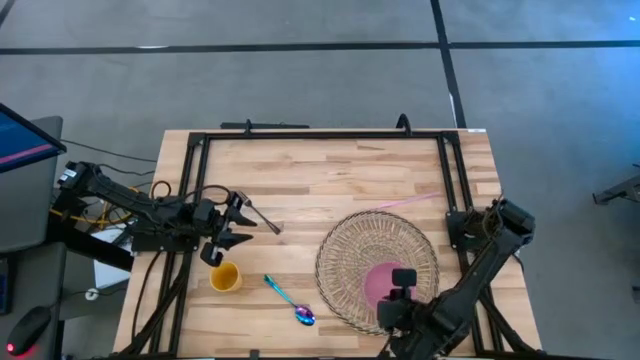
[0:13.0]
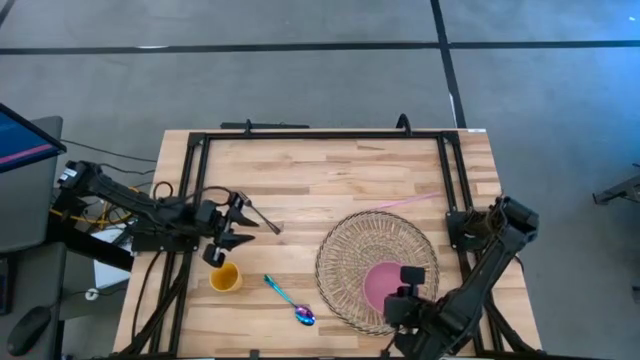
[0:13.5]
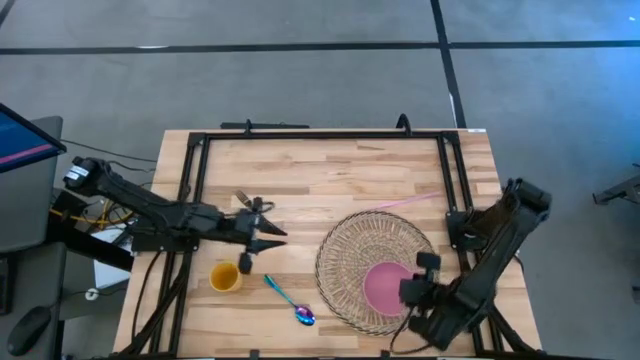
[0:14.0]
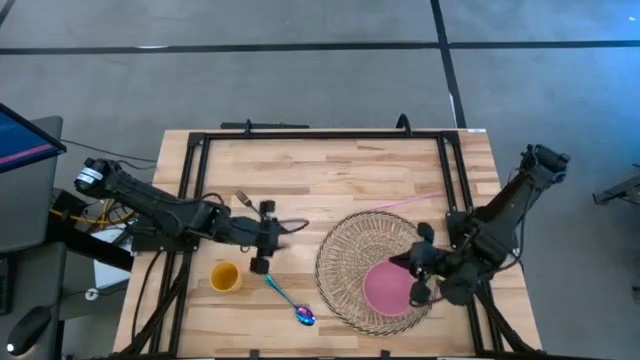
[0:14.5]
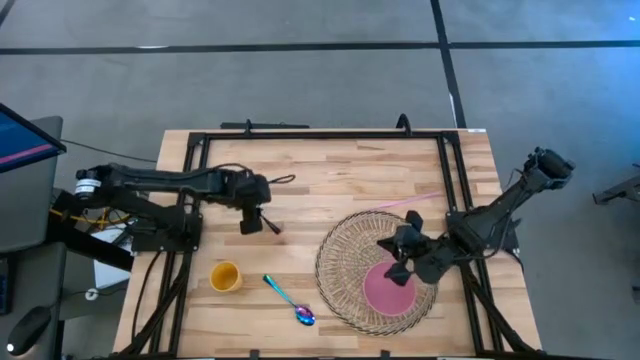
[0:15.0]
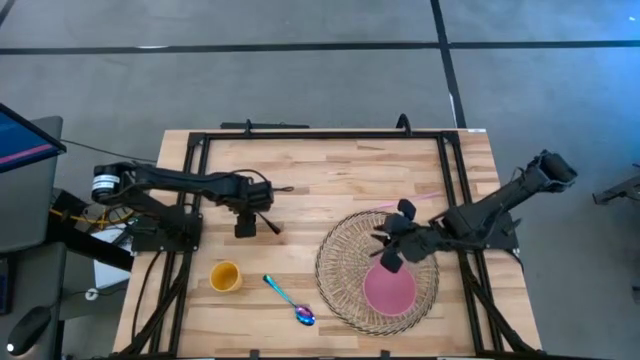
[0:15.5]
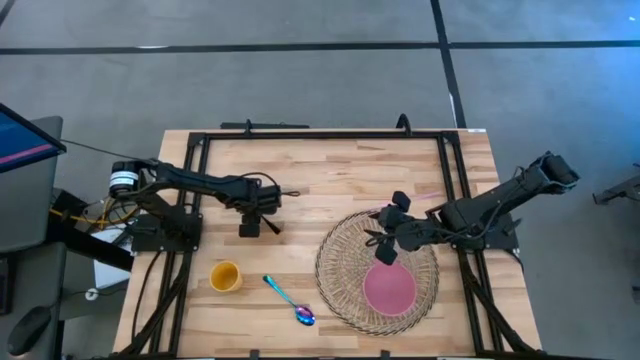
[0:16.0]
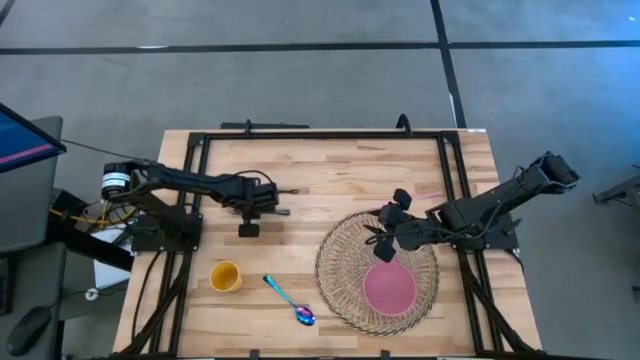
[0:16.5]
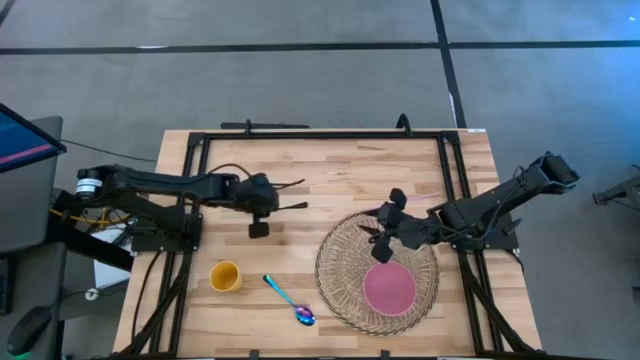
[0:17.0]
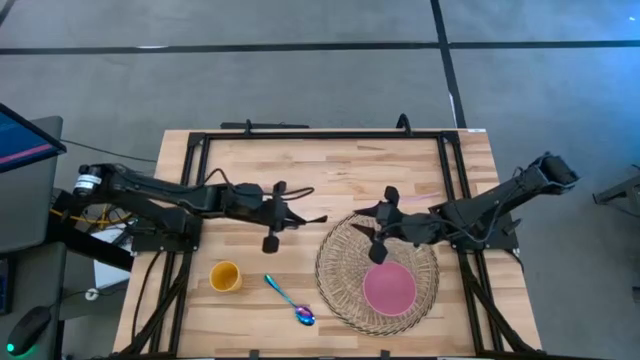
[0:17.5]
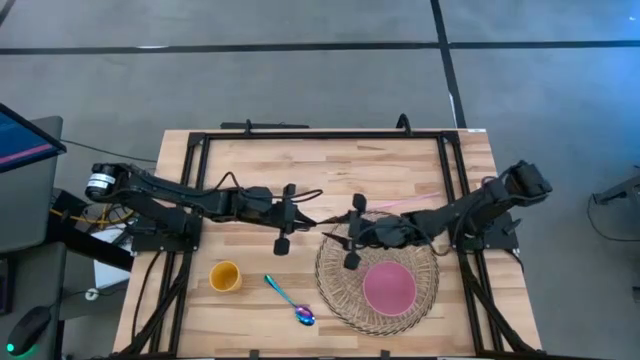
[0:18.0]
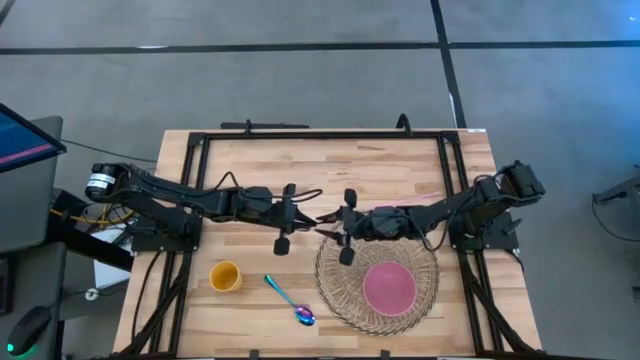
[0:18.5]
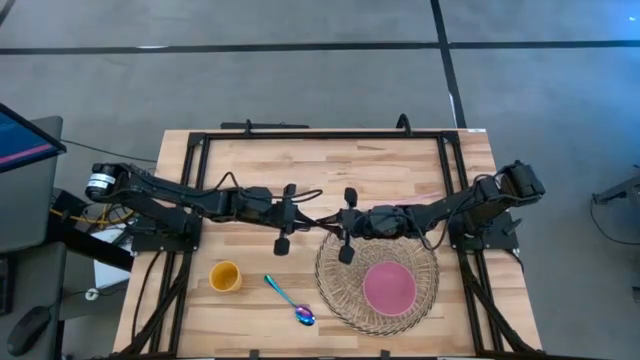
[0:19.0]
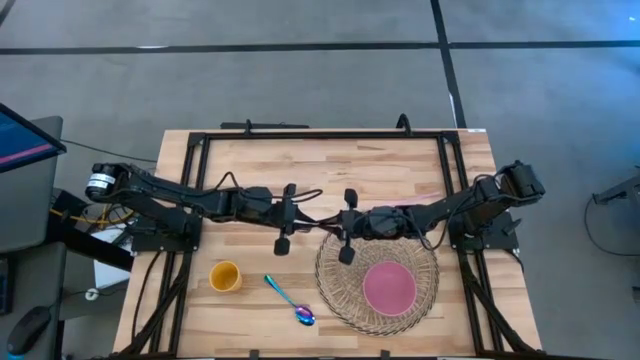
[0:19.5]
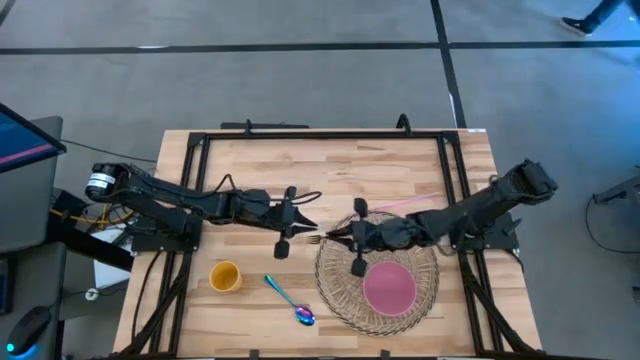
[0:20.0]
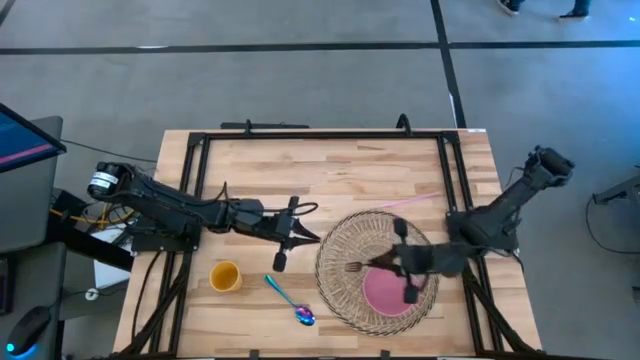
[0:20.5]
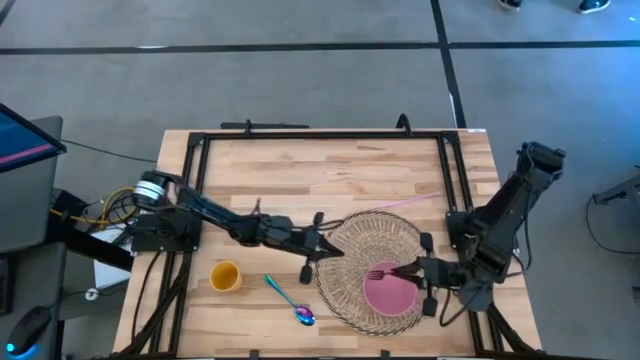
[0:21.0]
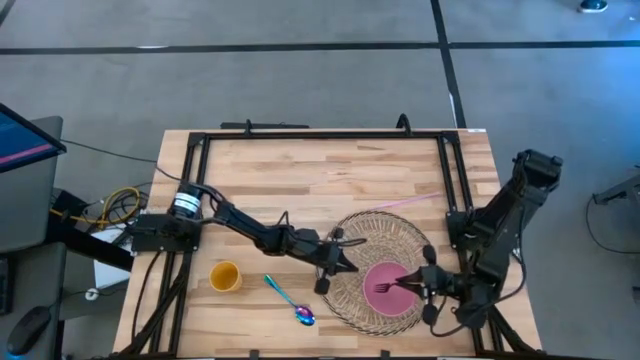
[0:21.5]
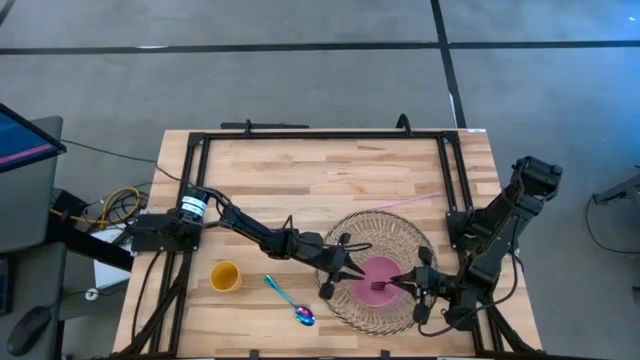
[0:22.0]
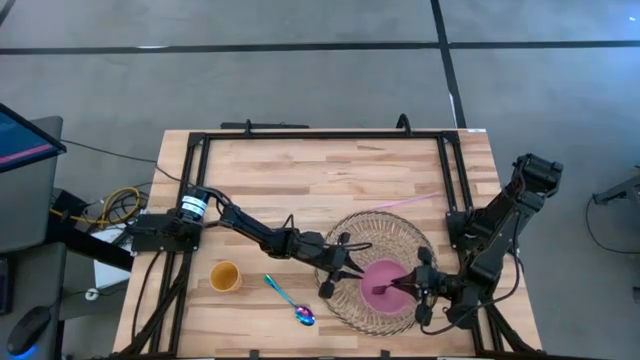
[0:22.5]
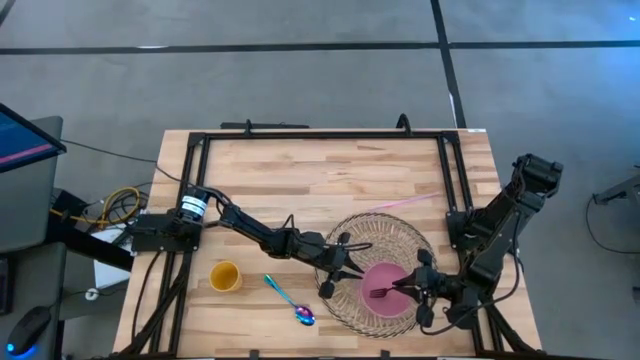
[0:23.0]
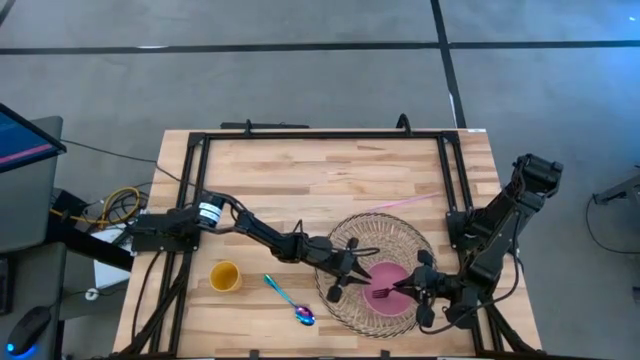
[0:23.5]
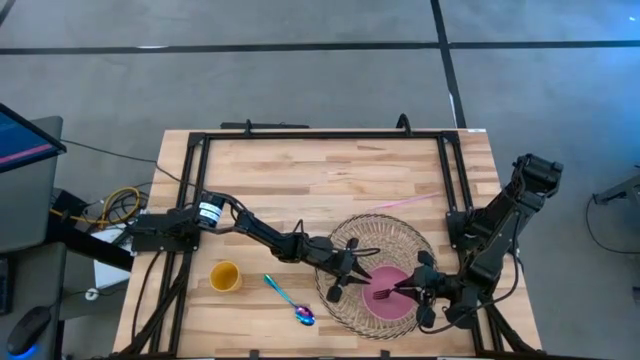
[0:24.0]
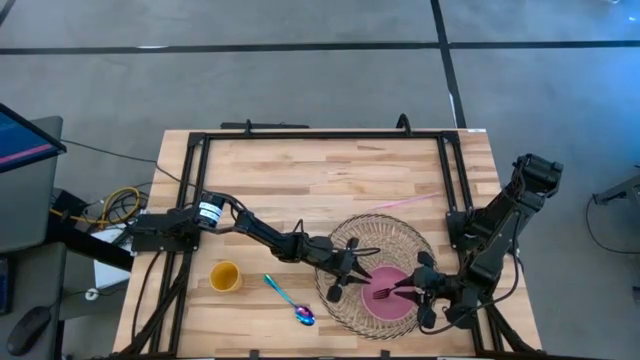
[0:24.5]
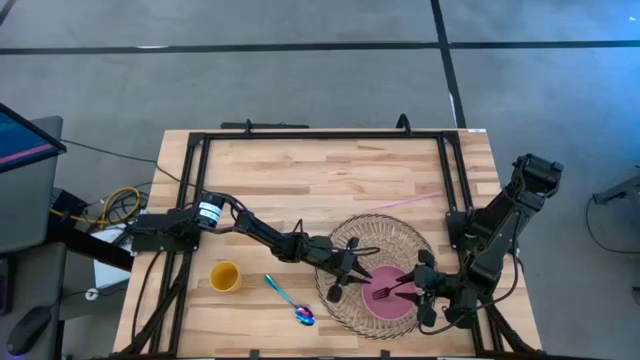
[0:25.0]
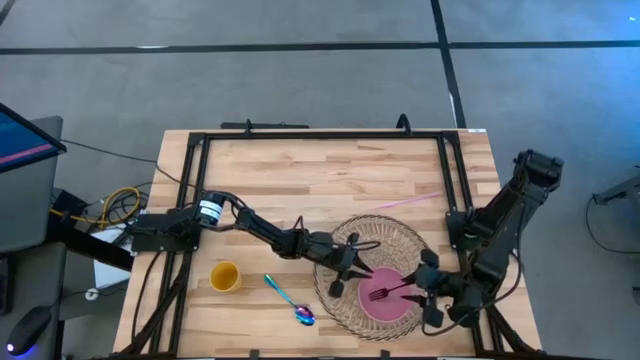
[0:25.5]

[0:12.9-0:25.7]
Task: Pick & Place Utensil
Put the black fork into the pink bowl on the brown mat
